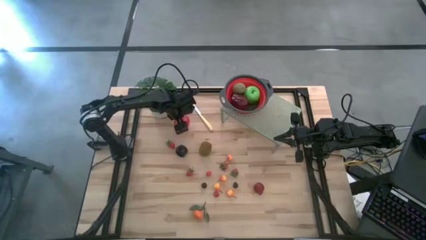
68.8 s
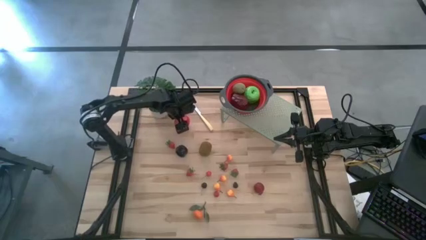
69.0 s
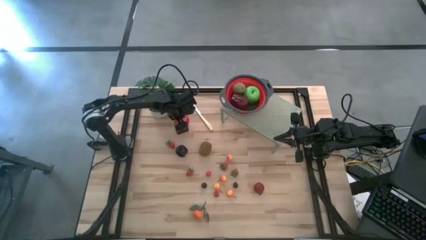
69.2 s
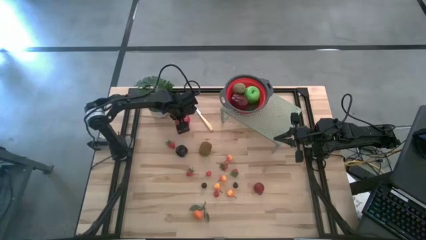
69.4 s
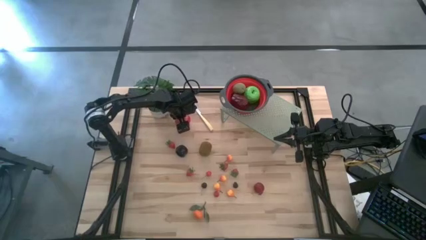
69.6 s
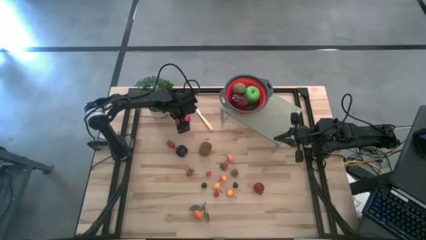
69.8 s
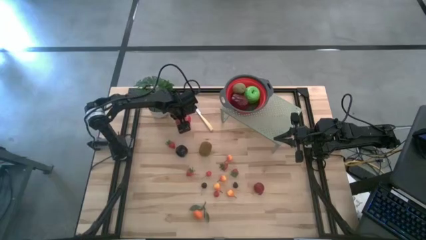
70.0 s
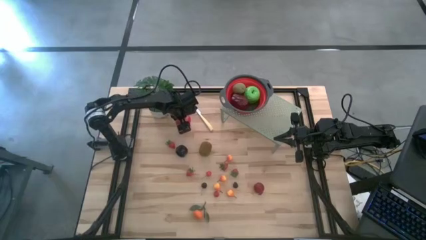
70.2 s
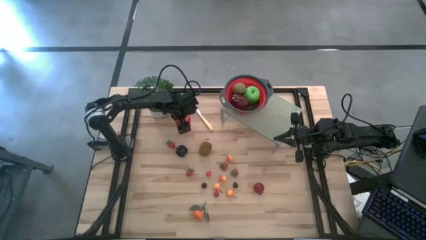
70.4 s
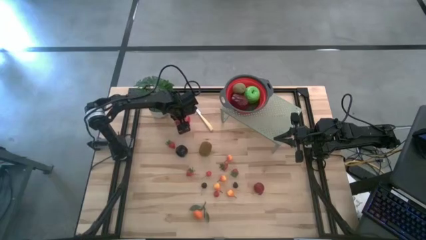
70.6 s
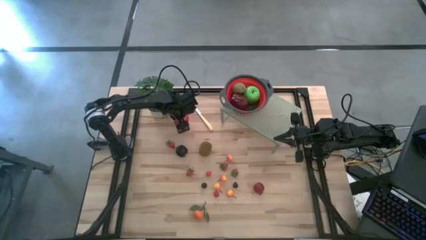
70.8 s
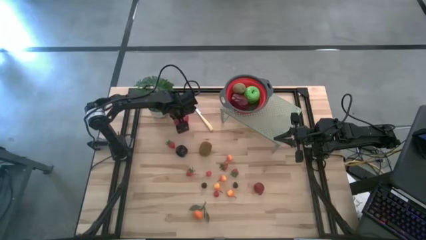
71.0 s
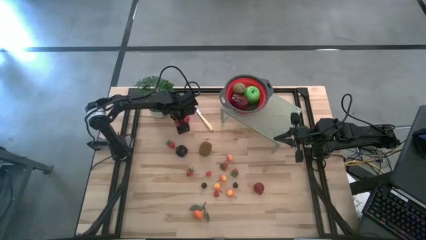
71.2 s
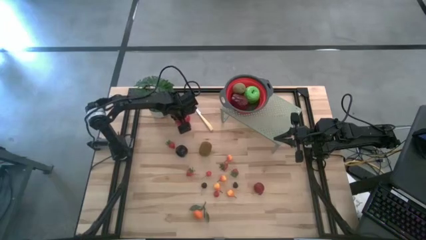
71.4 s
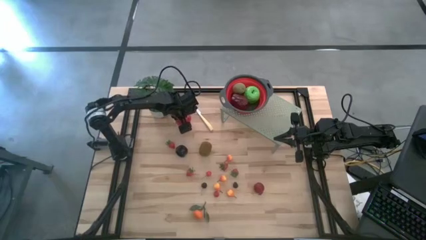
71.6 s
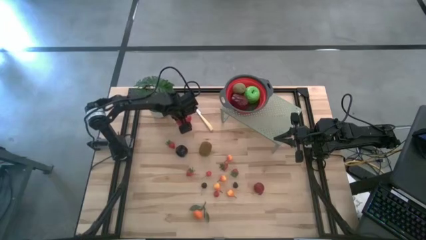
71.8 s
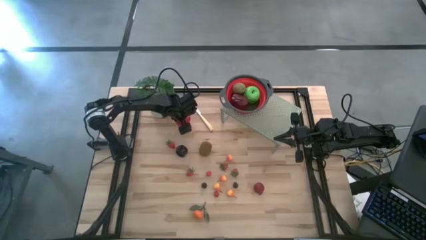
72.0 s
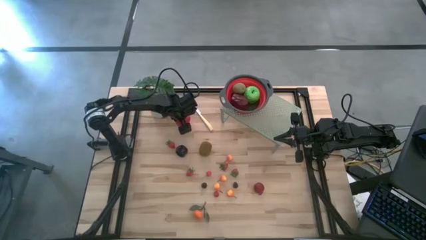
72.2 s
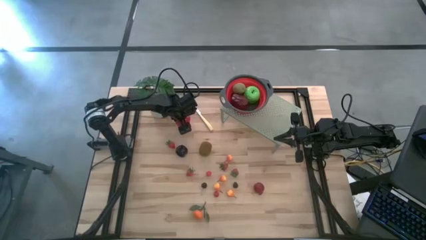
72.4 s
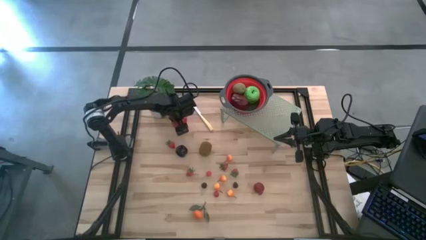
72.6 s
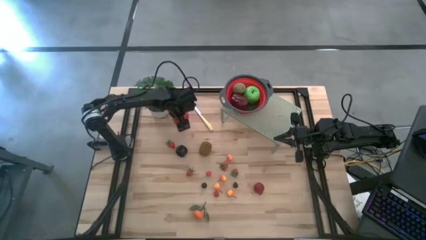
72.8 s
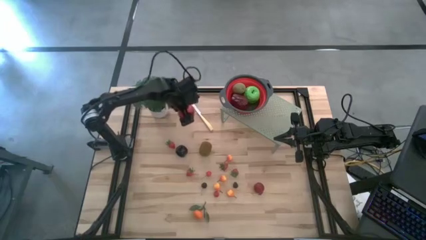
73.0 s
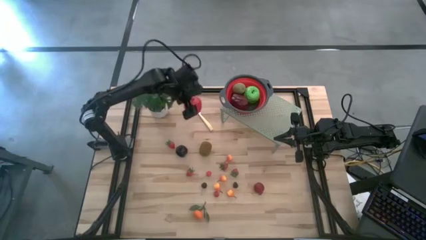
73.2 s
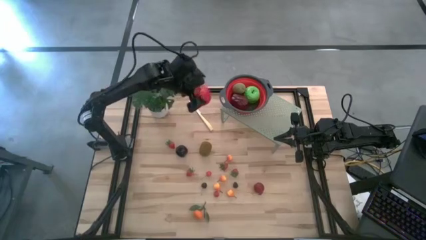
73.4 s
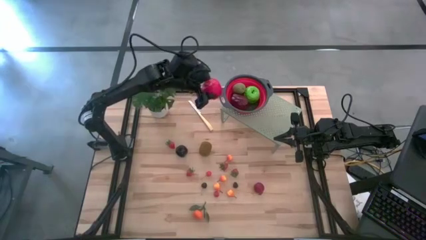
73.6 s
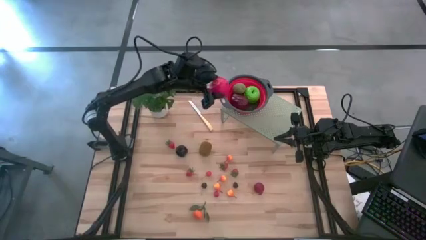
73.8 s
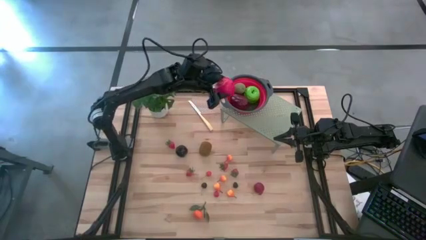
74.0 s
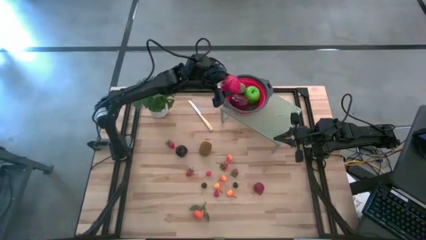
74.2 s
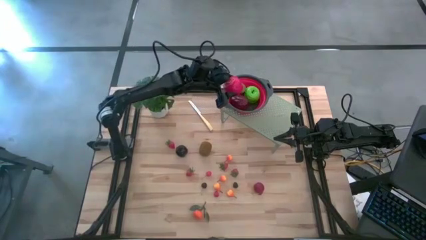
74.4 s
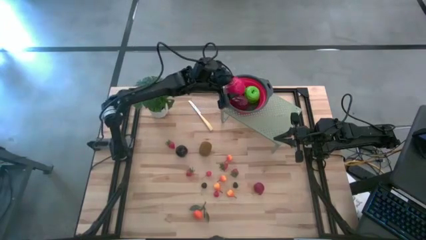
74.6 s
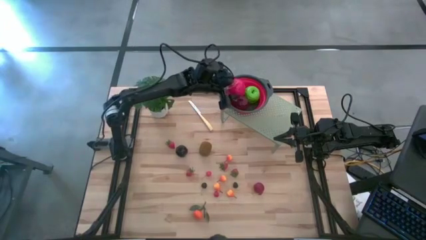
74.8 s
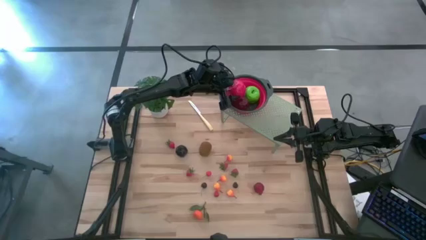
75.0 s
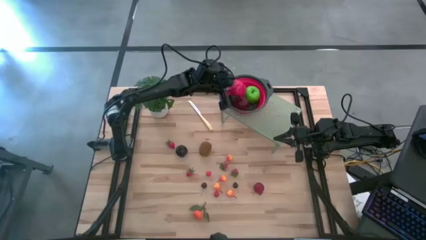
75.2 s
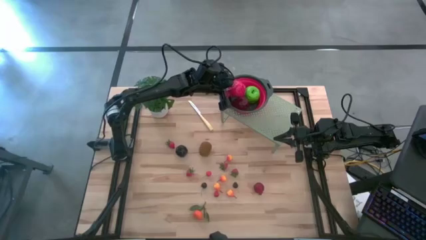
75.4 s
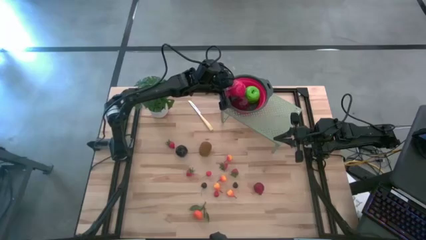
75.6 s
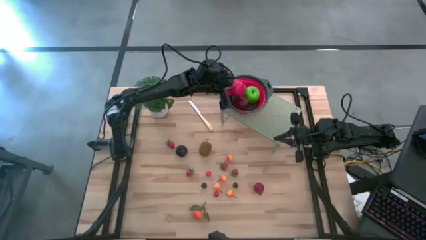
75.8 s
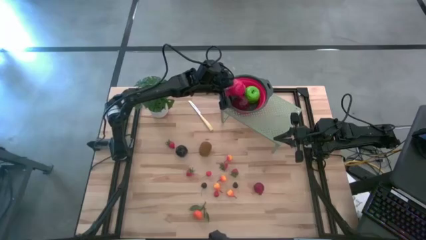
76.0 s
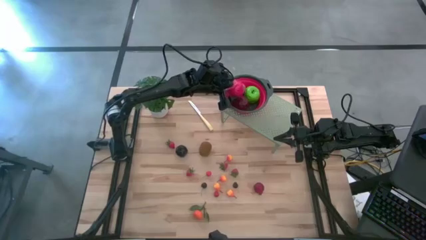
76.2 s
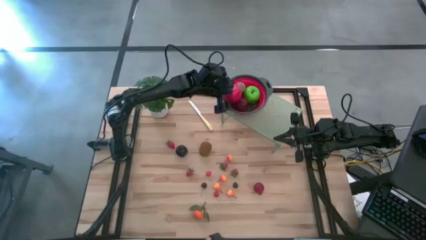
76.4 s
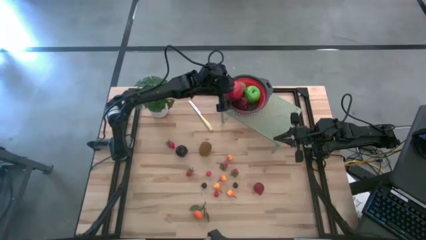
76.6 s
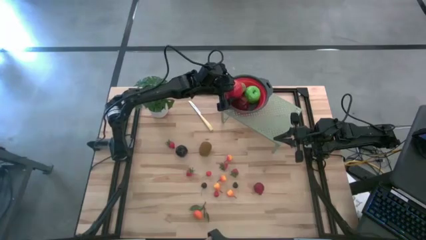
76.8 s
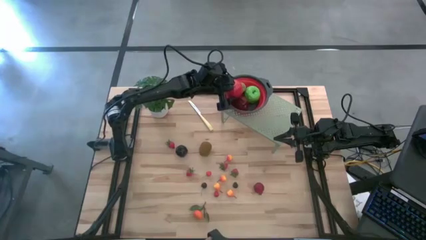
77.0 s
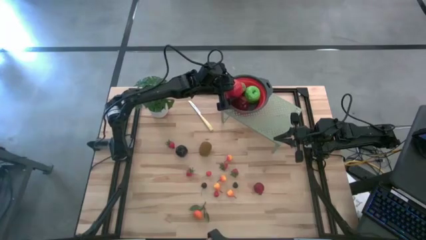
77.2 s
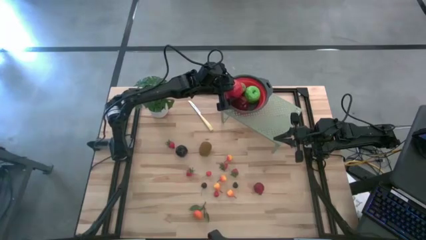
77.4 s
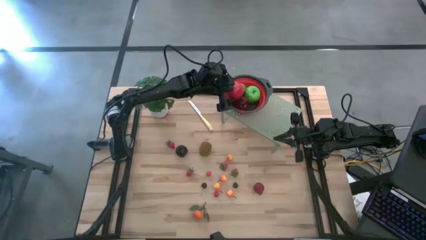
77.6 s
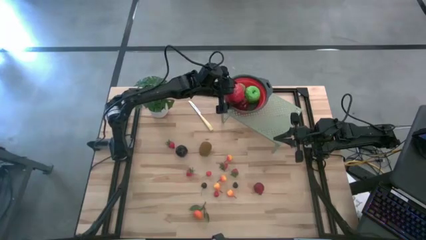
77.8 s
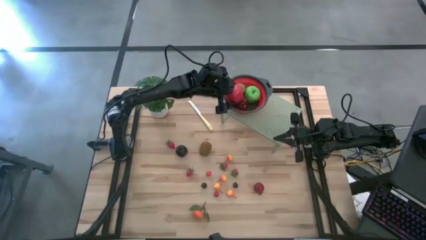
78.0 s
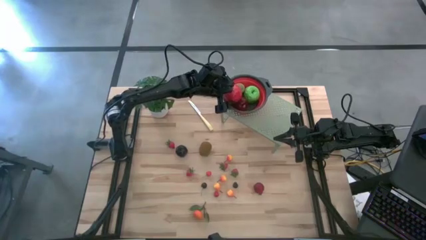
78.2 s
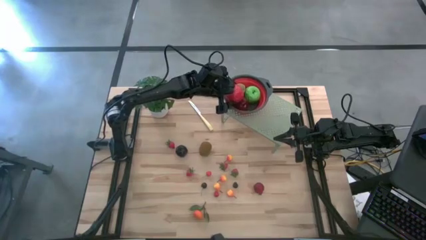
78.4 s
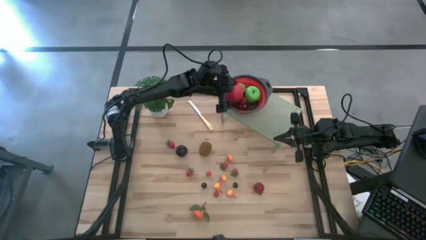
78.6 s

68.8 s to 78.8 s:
Task: Pick & Place Fruit
Put the red apple into the red gray colander on the shelf
